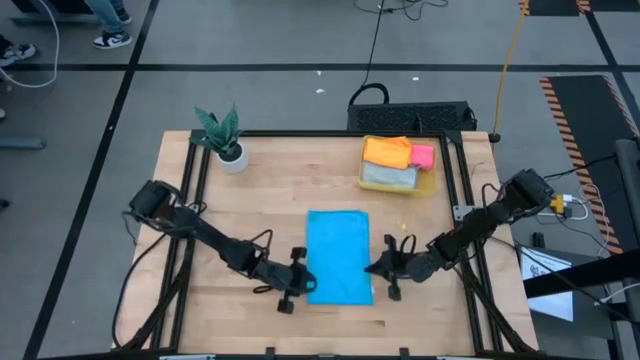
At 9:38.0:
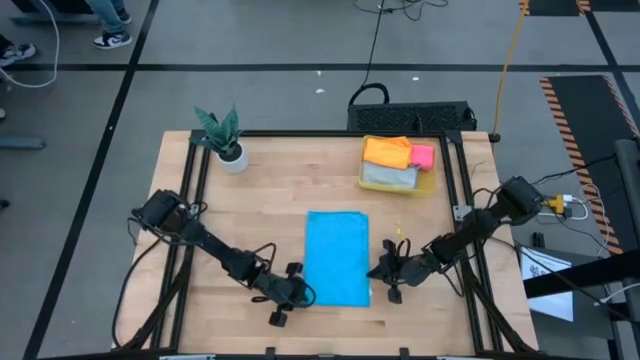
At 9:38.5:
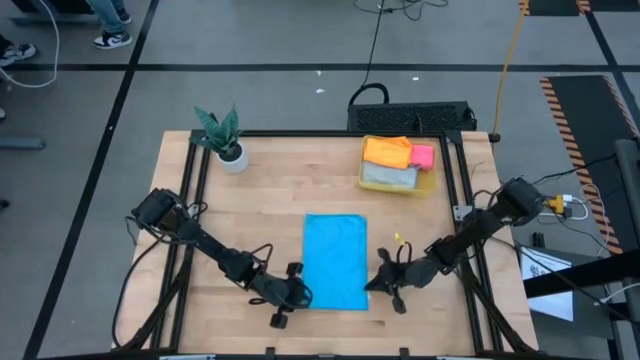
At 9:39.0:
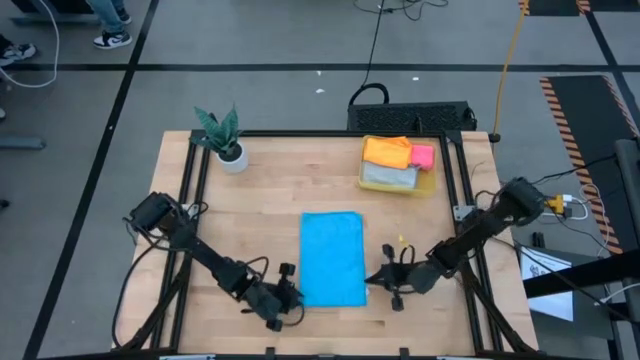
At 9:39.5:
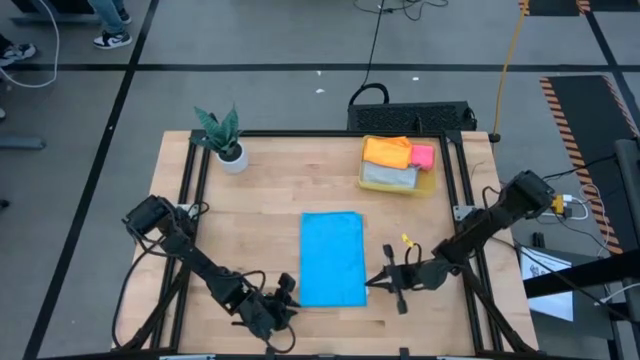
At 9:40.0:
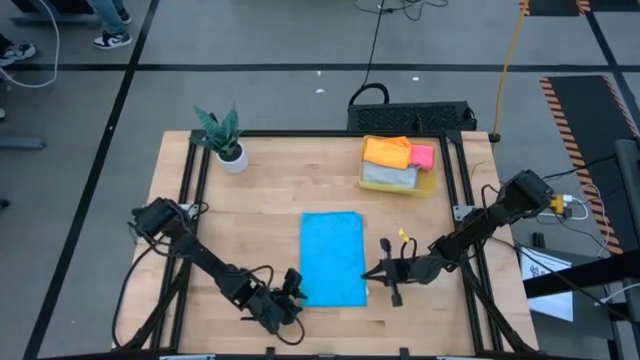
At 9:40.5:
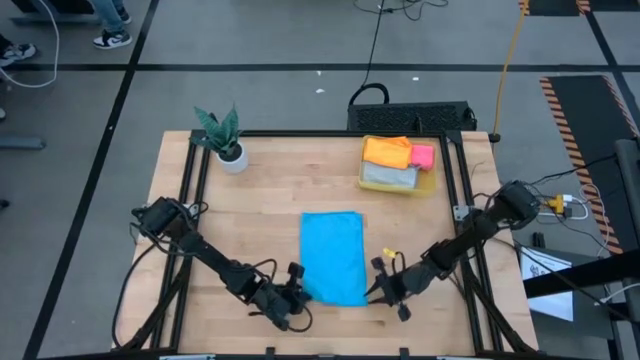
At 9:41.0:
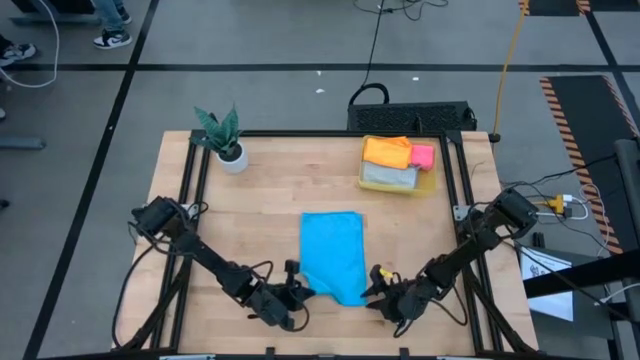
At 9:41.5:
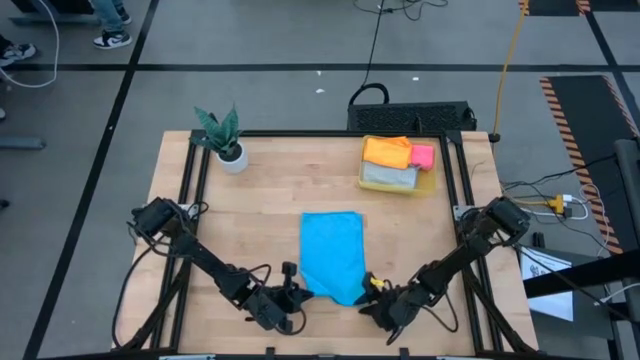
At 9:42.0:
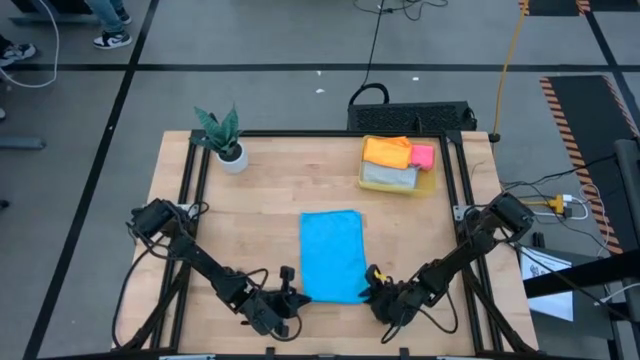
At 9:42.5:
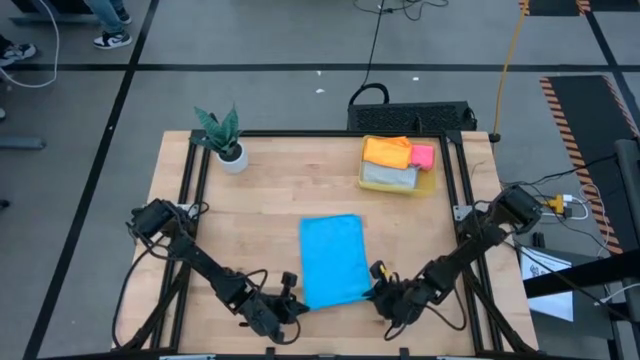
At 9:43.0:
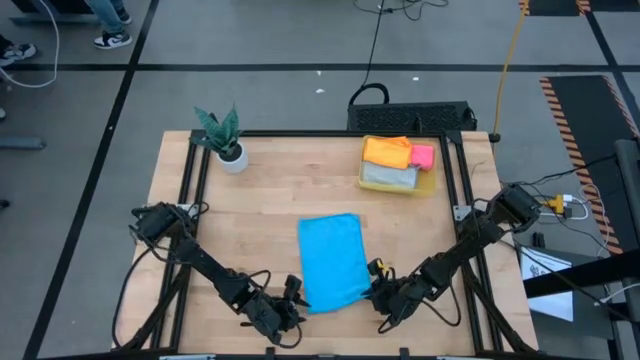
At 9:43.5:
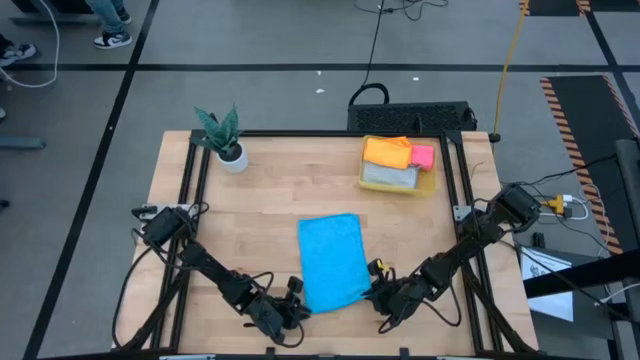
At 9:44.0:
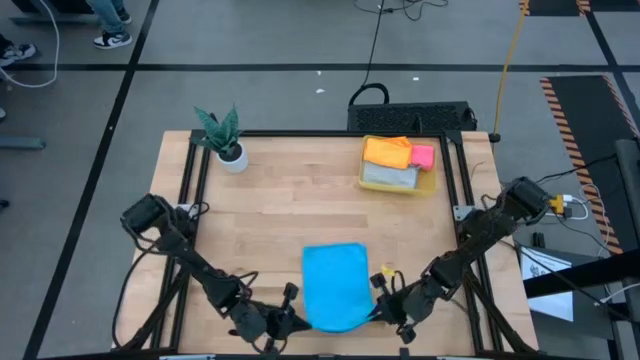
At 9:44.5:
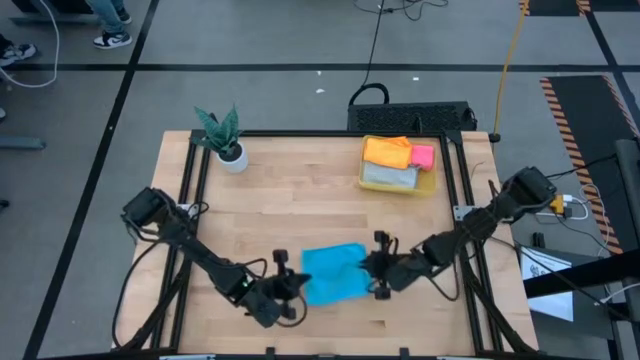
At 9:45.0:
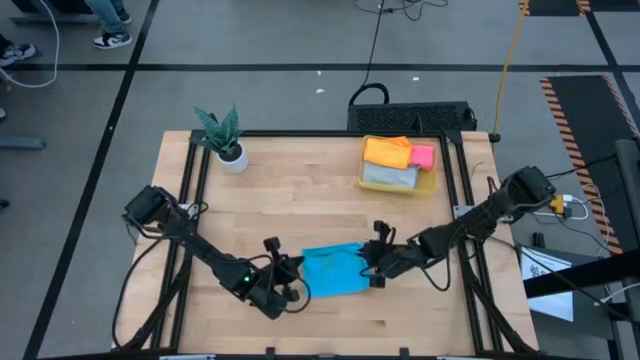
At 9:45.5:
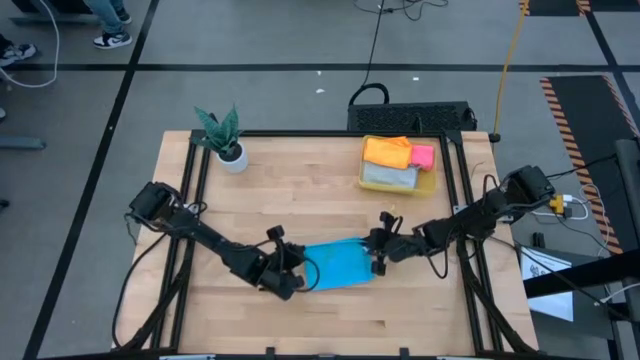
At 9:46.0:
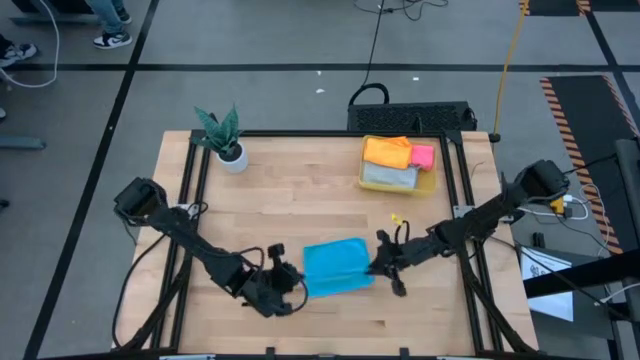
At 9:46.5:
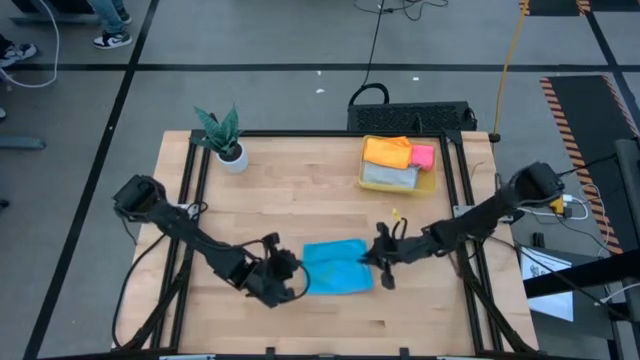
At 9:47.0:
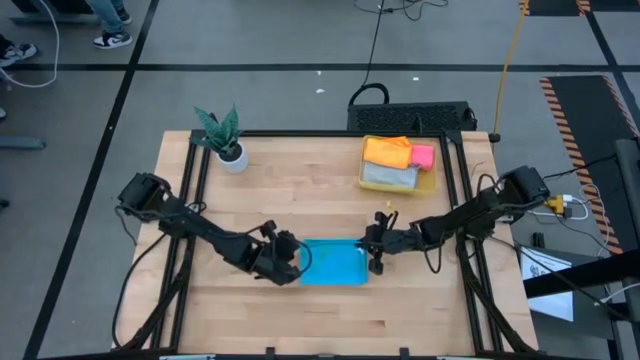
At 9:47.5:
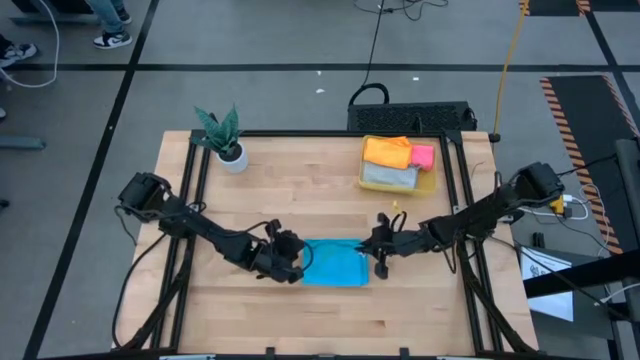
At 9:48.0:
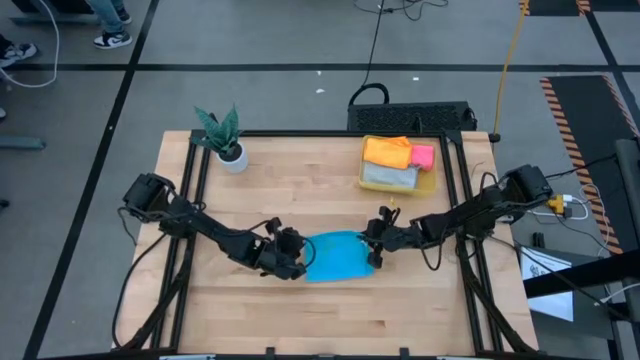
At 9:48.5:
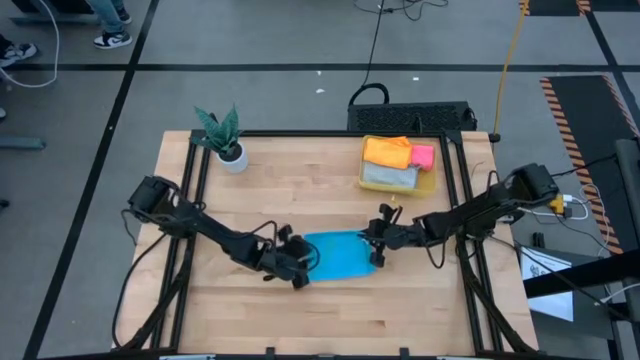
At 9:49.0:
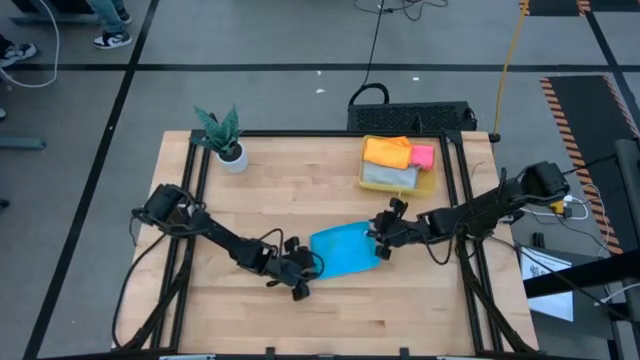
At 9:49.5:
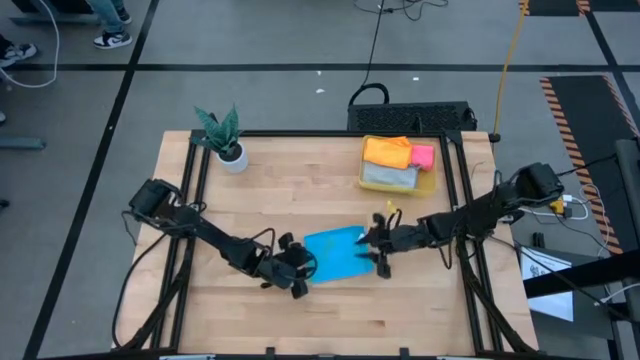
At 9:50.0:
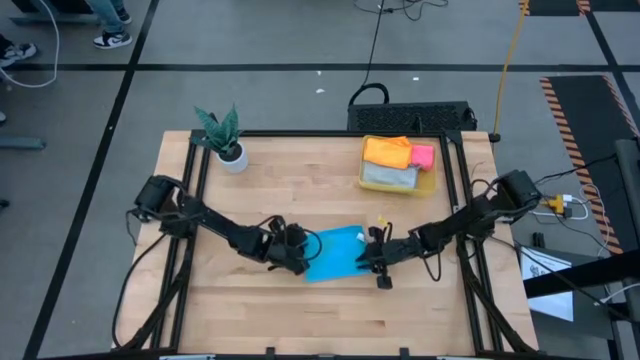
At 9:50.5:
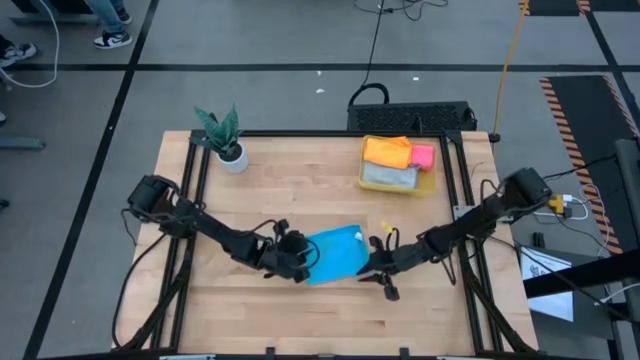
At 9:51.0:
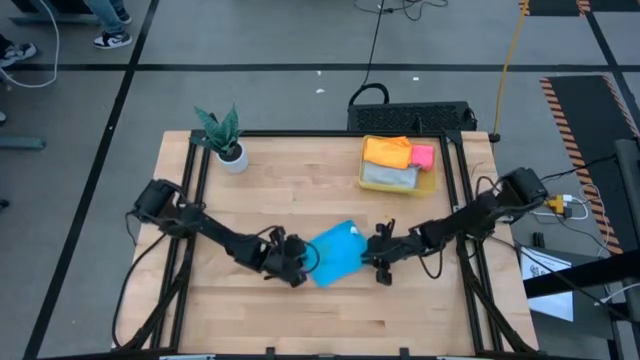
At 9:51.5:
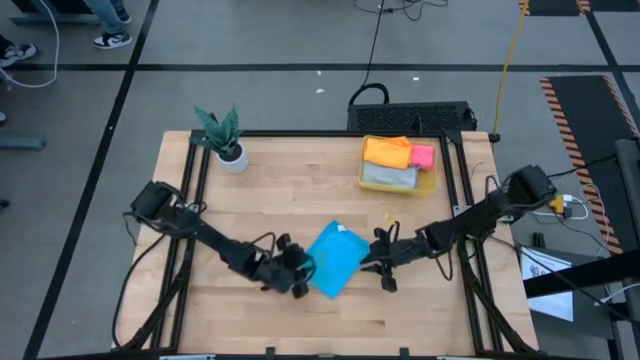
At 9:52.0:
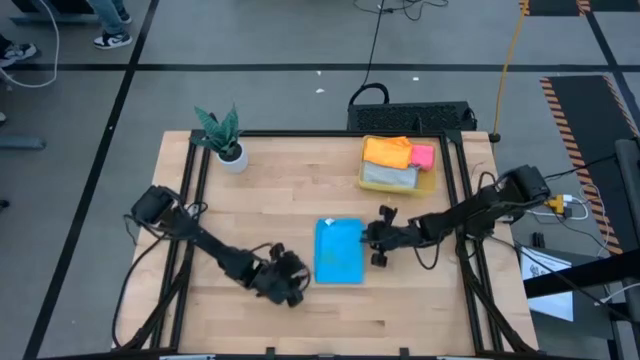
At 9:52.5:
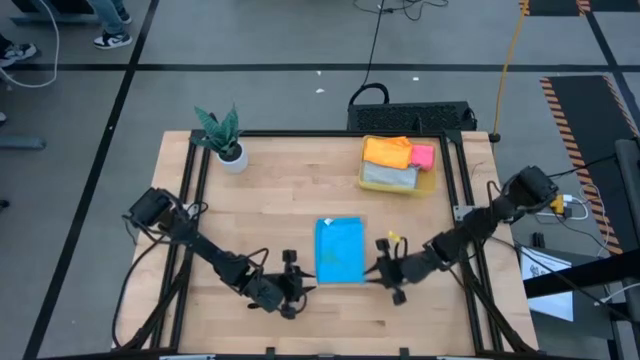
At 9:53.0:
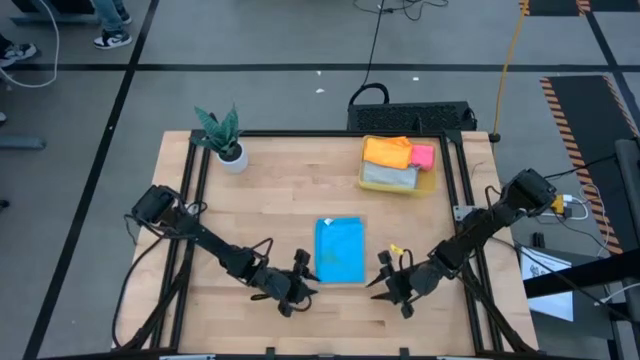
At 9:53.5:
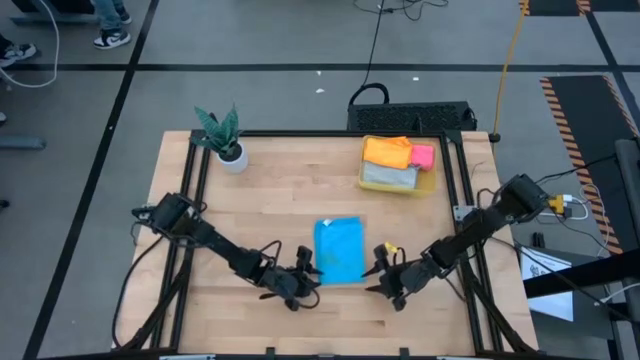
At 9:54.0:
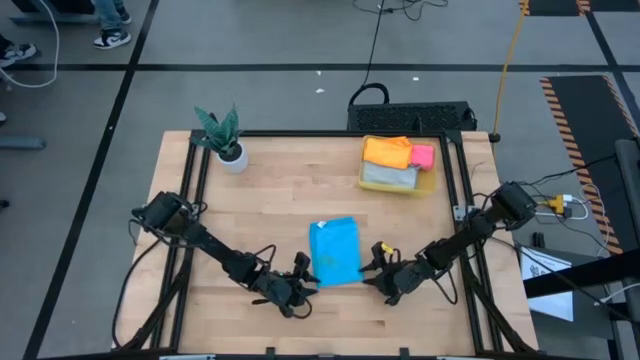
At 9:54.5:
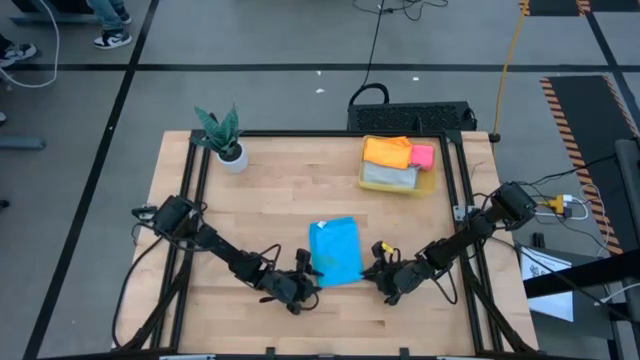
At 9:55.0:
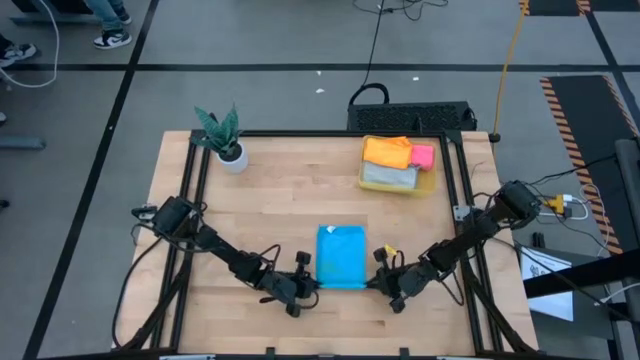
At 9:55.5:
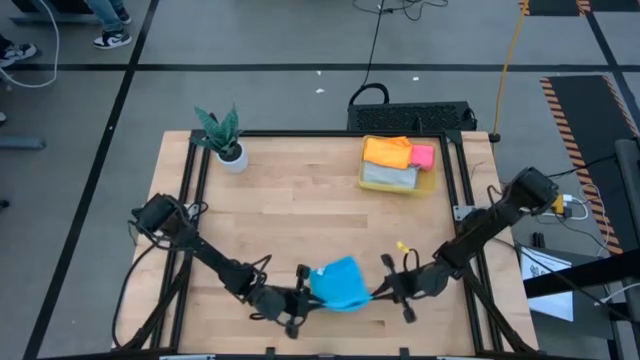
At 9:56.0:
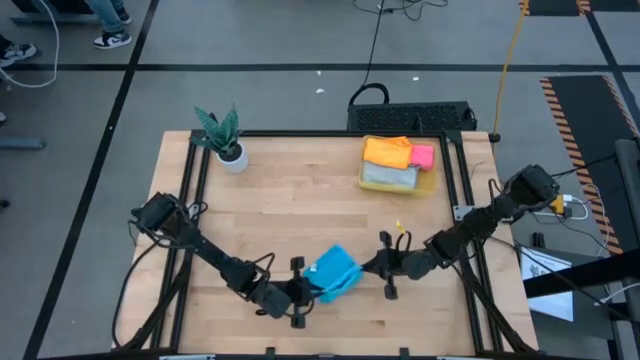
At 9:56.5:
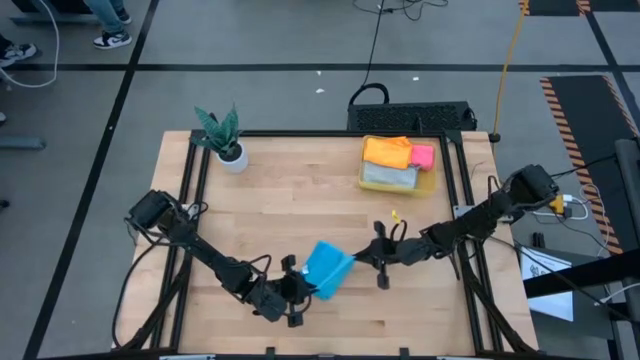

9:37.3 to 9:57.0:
Task: Fold microfiber towels
Fold the blue kitchen towel

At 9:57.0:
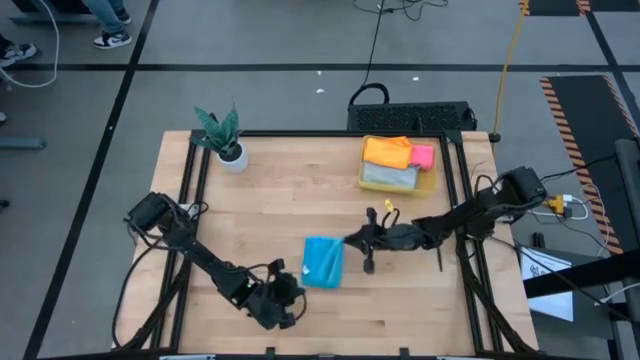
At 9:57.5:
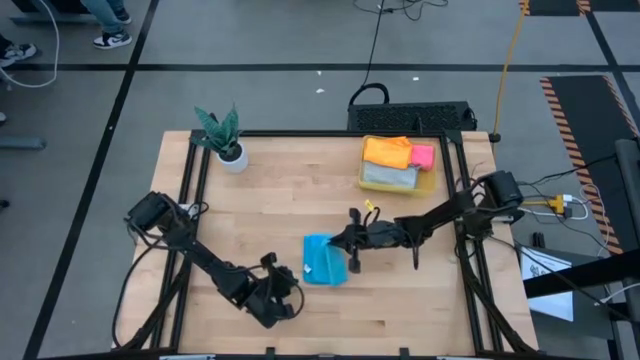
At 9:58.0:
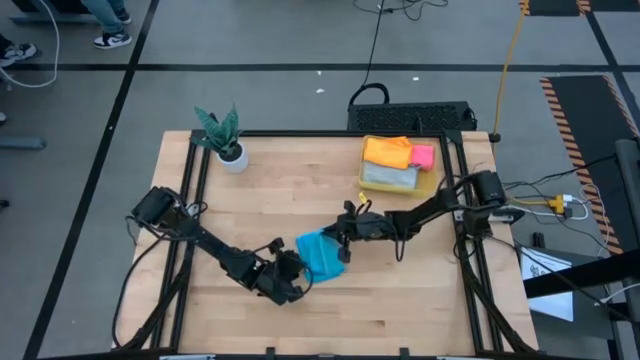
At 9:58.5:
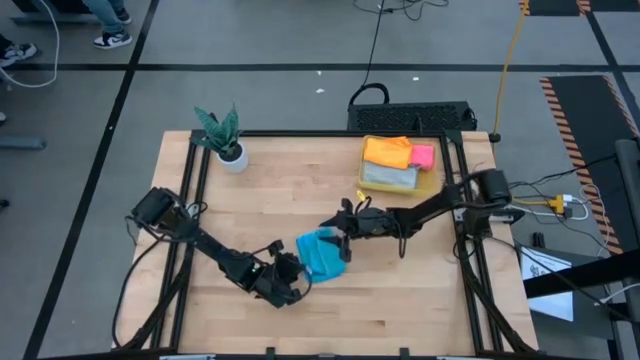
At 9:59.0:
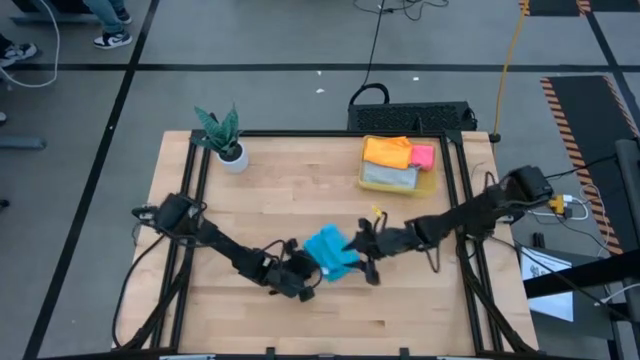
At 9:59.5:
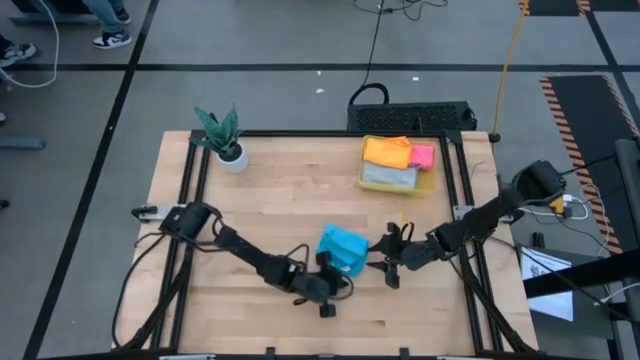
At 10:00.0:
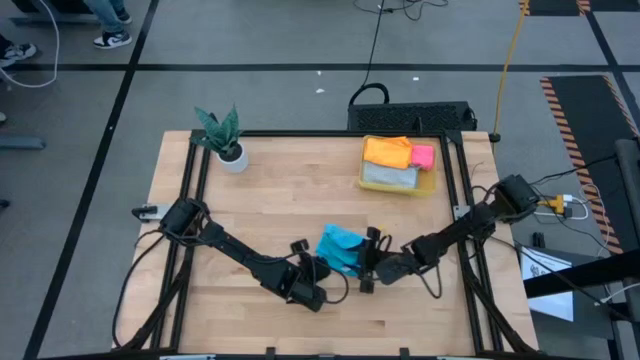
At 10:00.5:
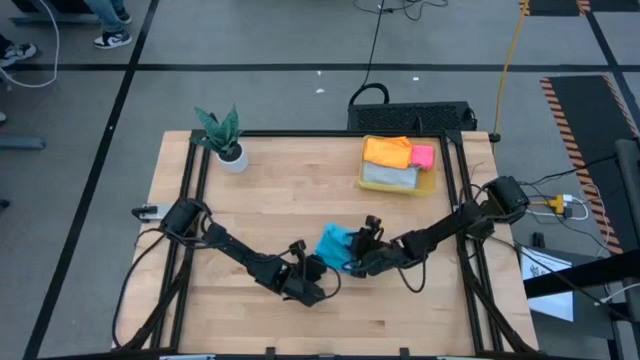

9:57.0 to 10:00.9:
Fold the blue kitchen towel
